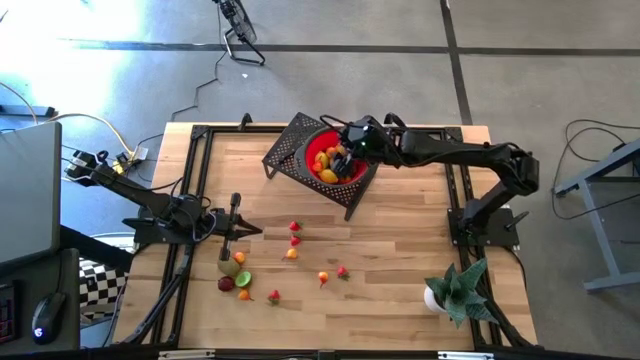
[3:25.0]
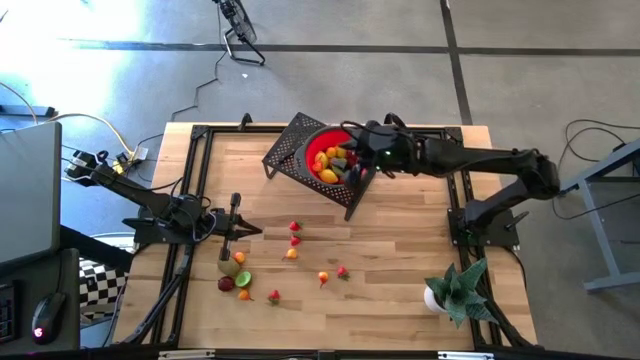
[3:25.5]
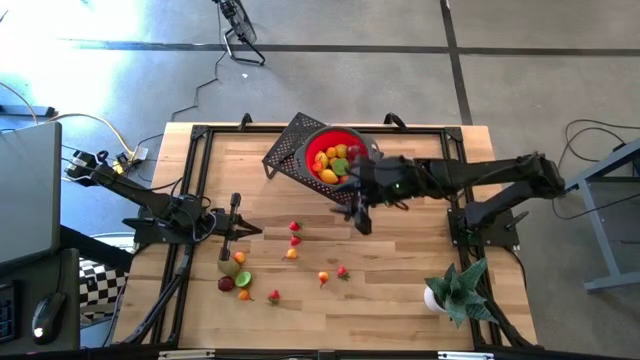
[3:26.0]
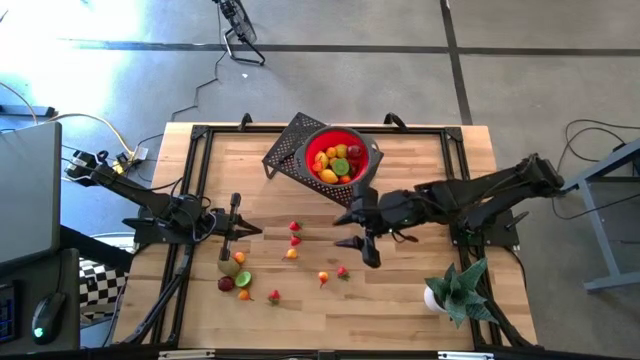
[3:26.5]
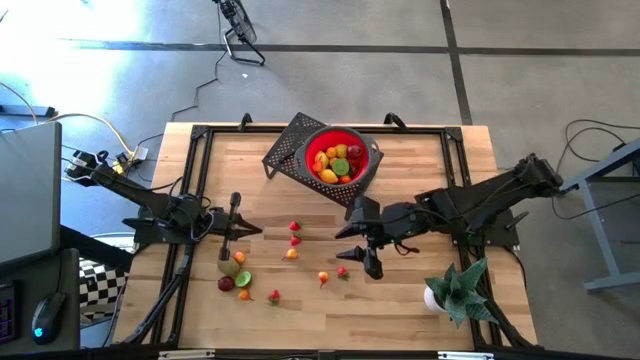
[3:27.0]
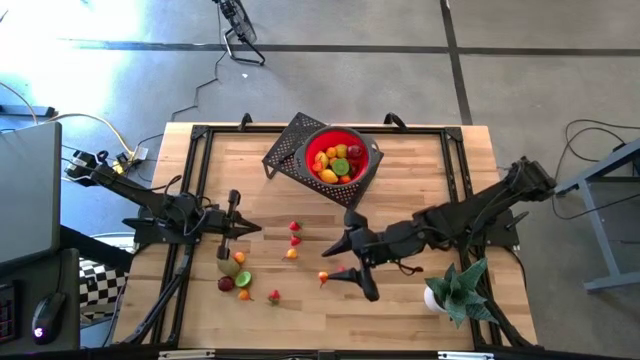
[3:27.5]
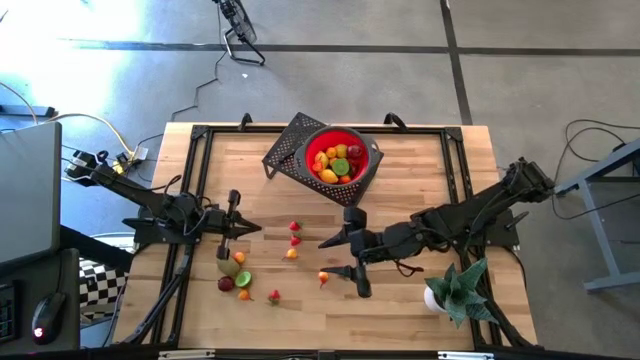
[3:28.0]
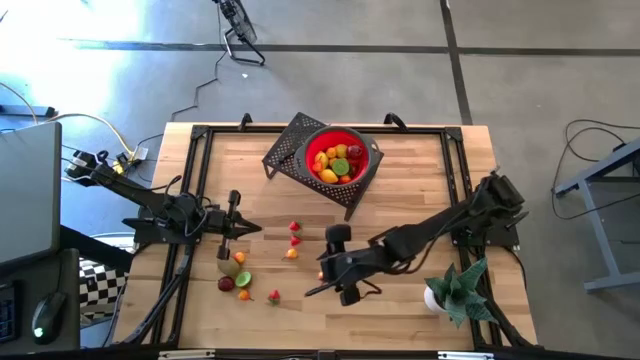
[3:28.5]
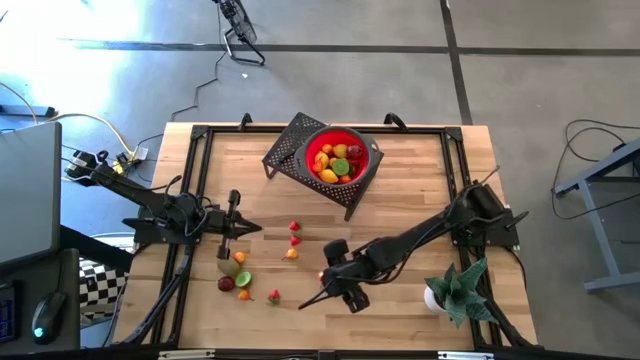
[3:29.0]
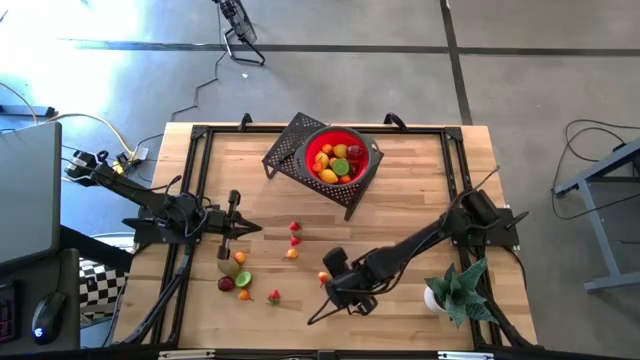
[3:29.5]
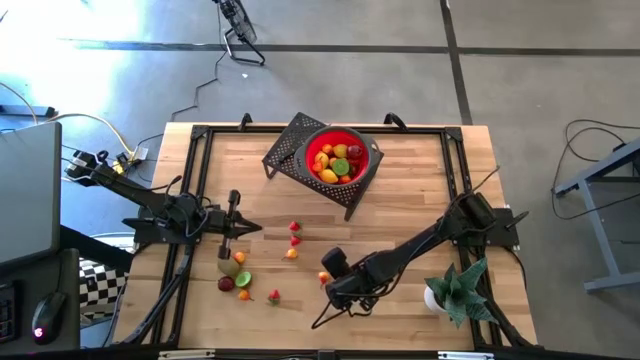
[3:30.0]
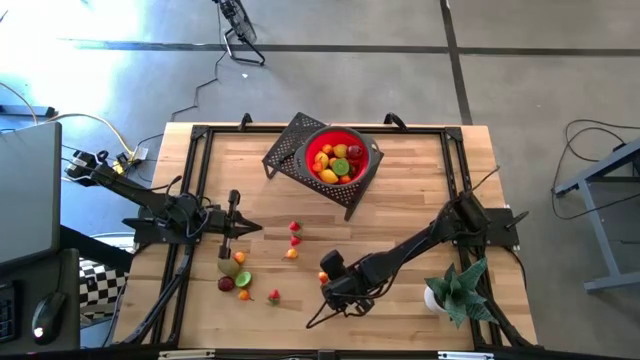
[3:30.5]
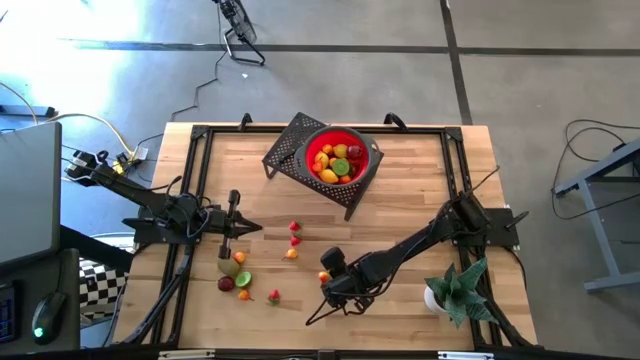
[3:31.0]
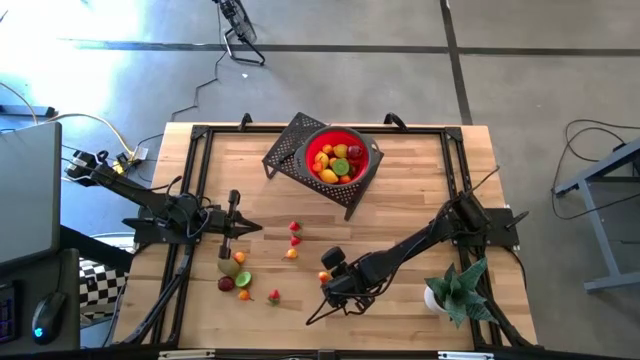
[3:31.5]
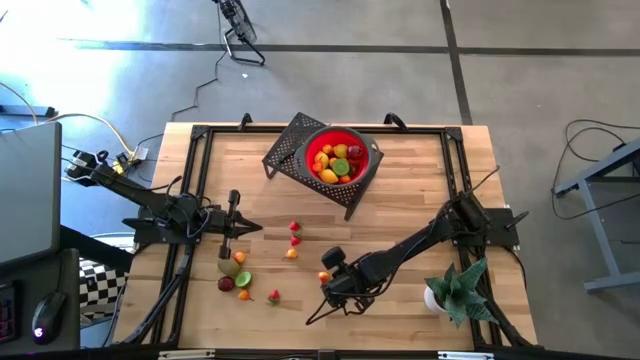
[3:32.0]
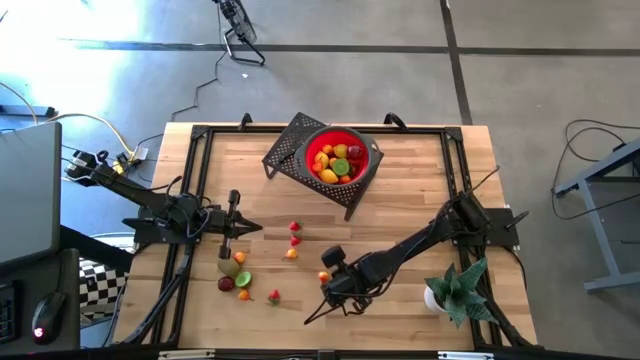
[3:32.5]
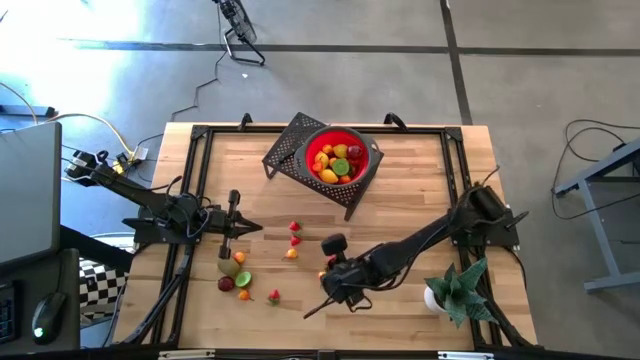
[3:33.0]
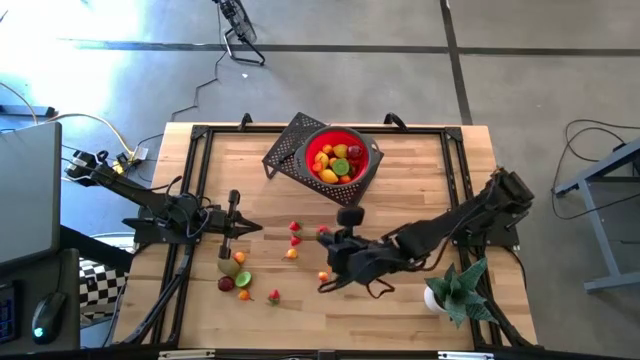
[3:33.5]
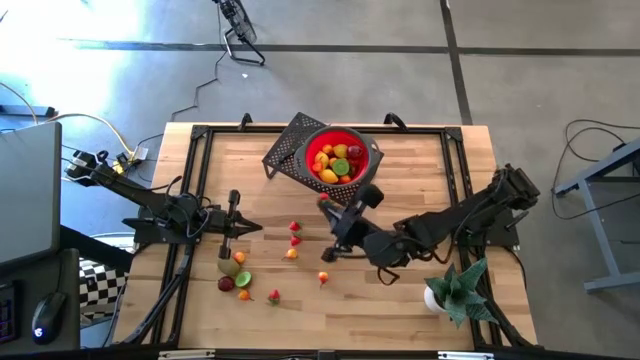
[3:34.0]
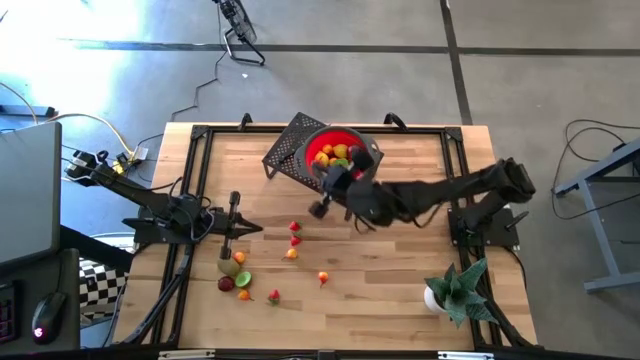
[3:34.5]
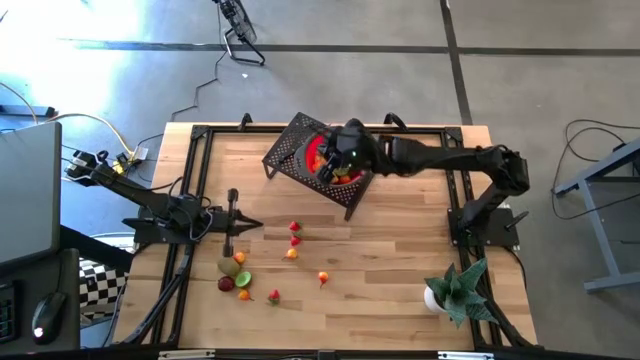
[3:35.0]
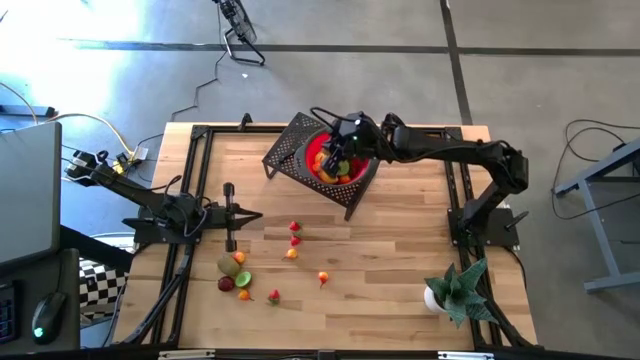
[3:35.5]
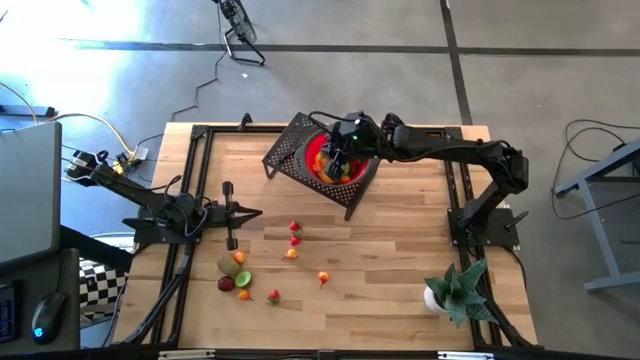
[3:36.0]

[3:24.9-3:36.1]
Task: Pick & Place Fruit
Put the strawberry into the strainer bowl on the shelf

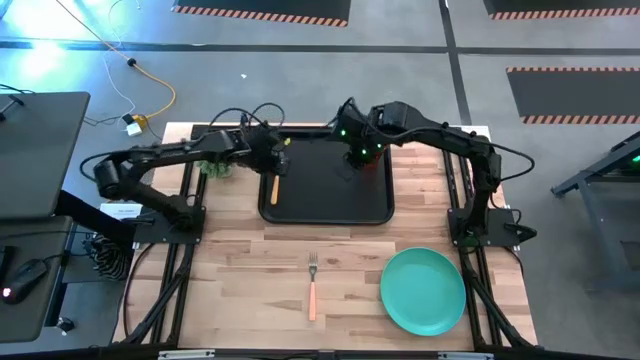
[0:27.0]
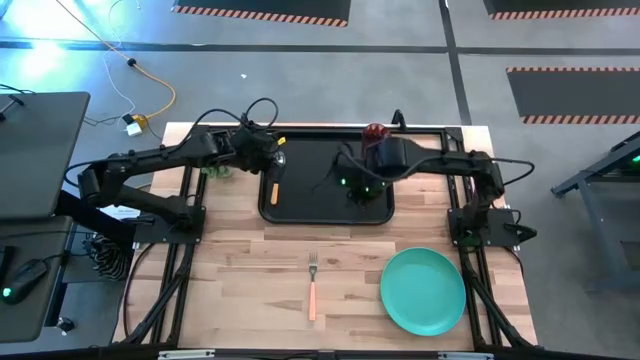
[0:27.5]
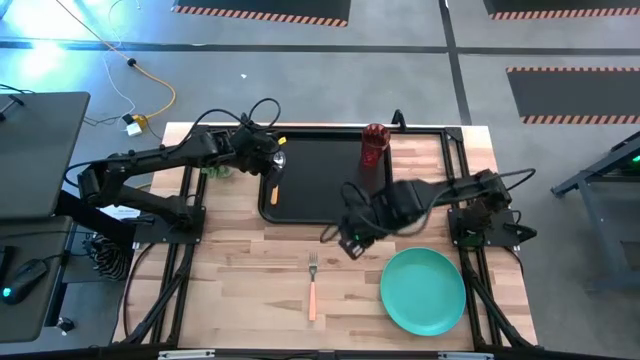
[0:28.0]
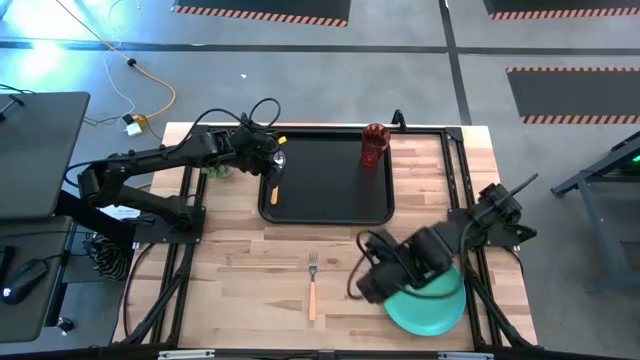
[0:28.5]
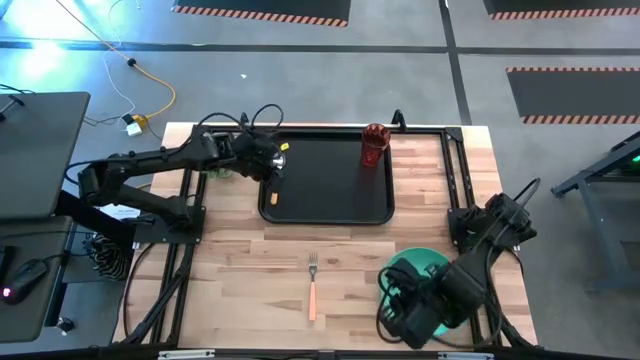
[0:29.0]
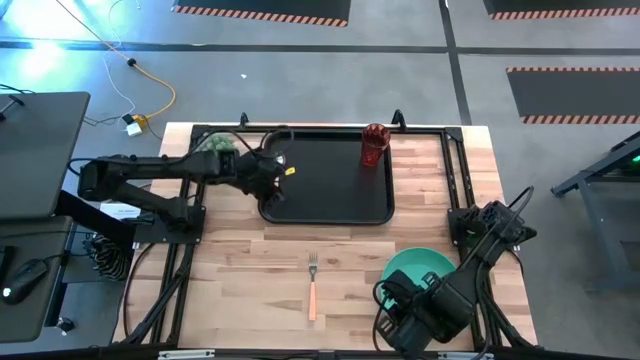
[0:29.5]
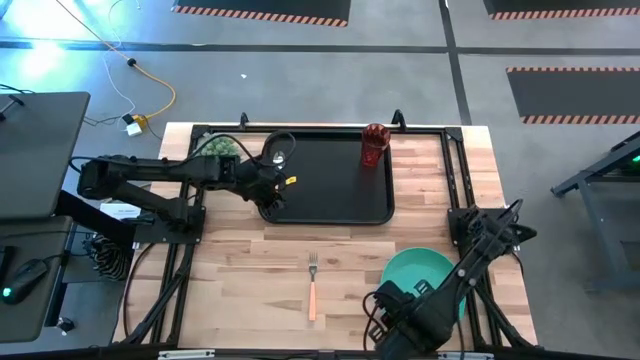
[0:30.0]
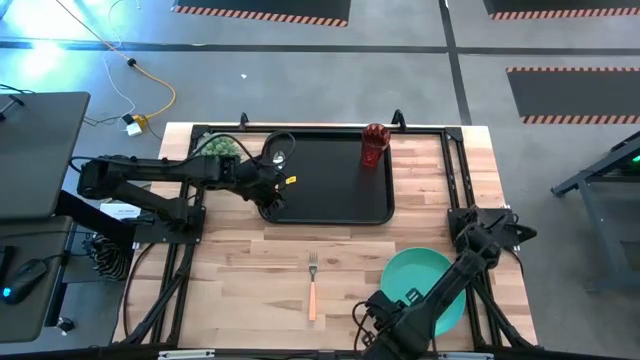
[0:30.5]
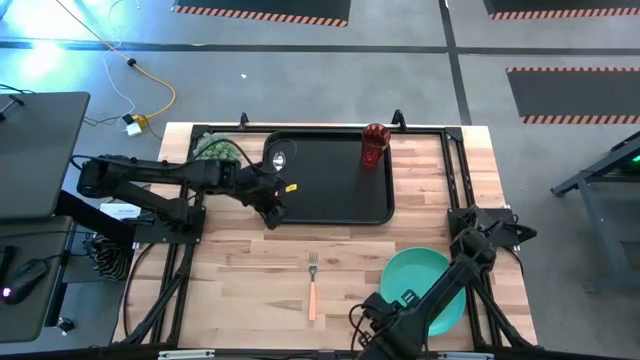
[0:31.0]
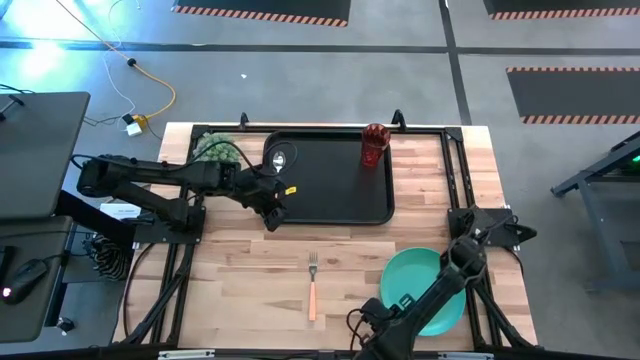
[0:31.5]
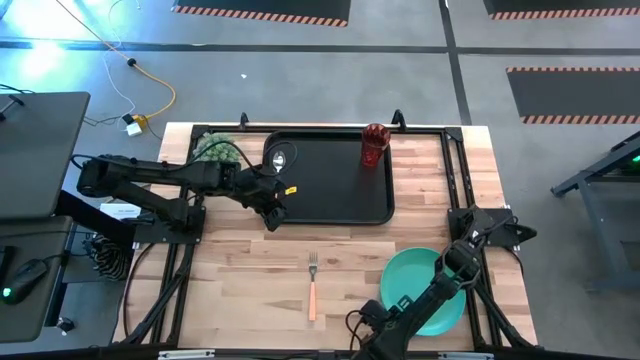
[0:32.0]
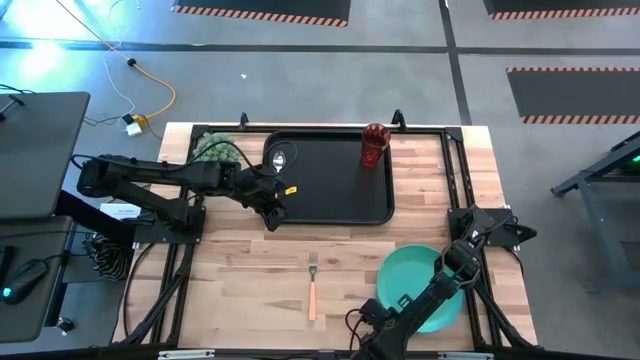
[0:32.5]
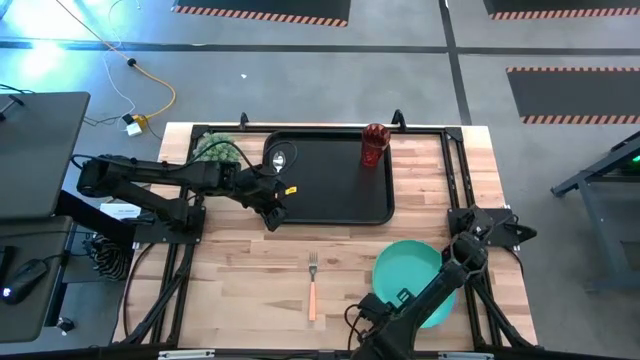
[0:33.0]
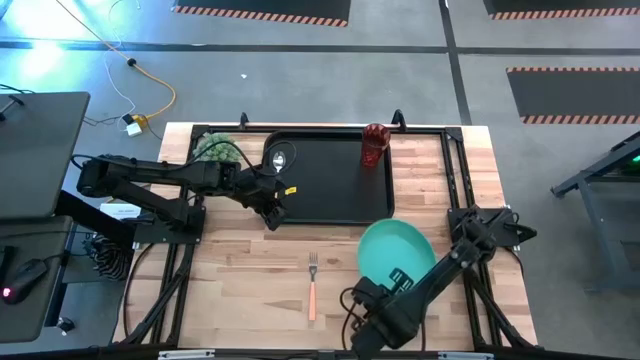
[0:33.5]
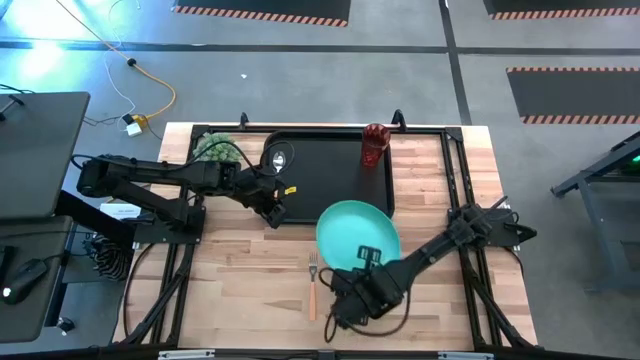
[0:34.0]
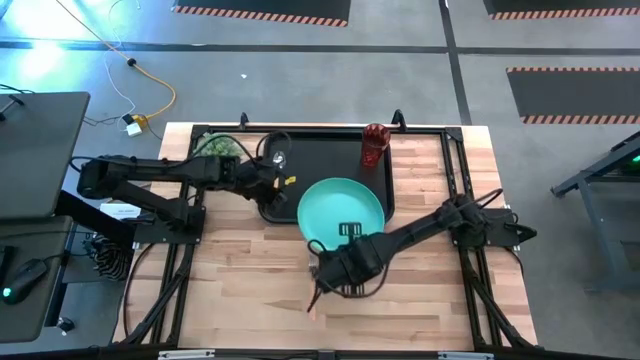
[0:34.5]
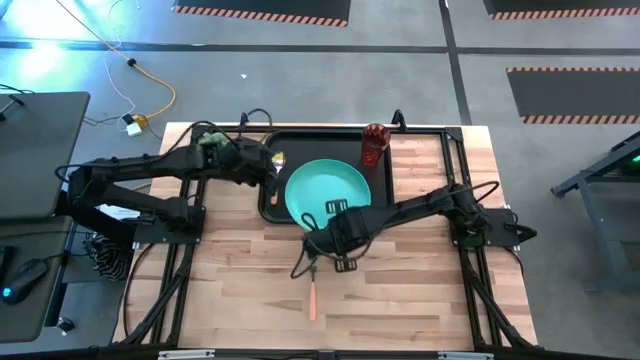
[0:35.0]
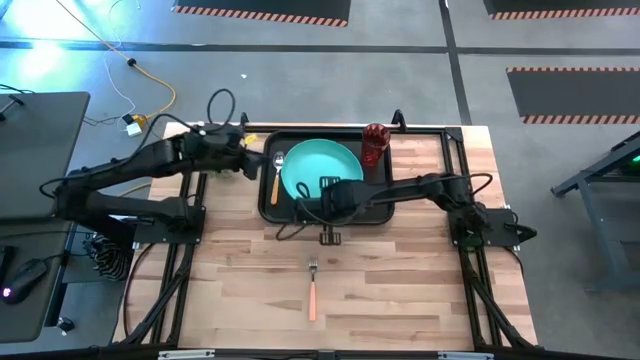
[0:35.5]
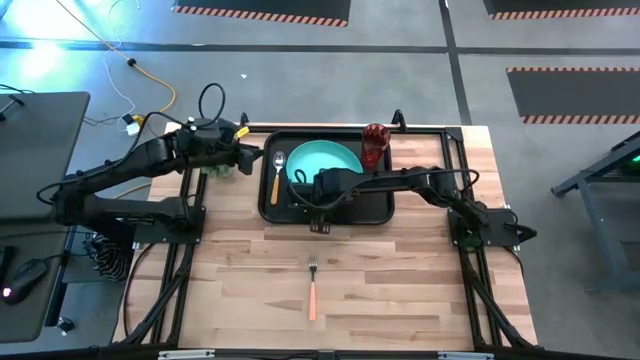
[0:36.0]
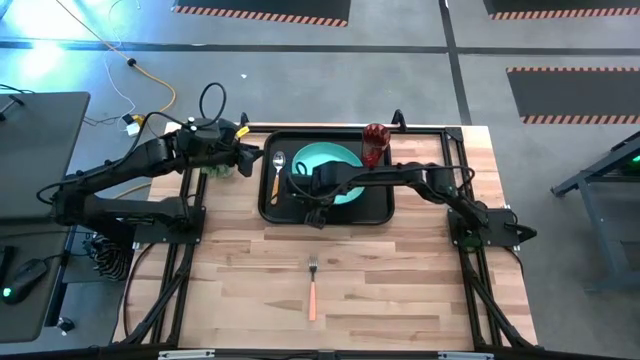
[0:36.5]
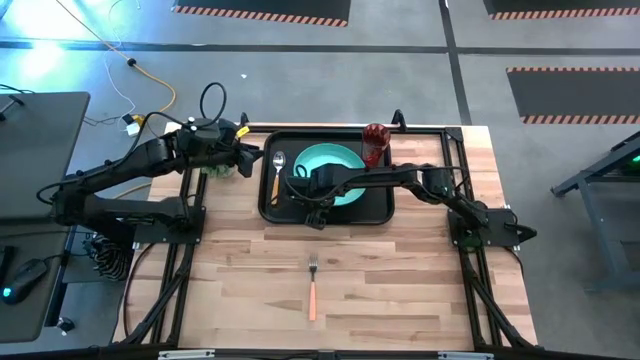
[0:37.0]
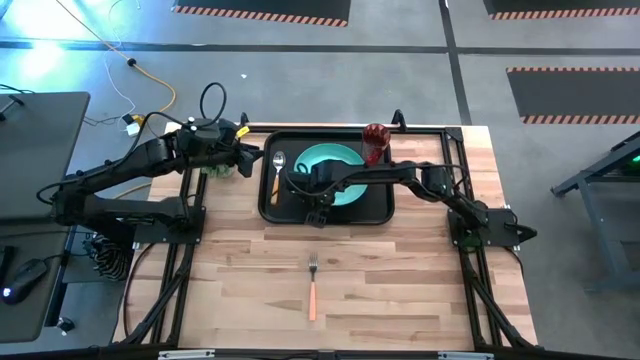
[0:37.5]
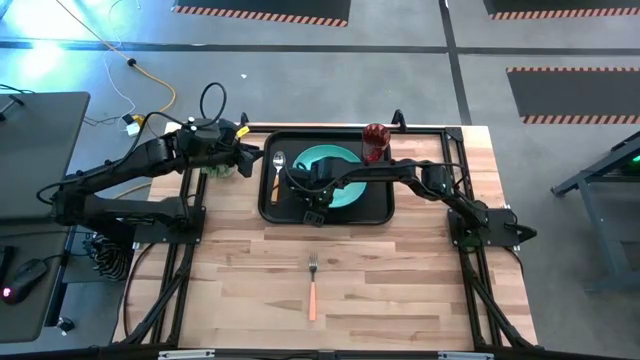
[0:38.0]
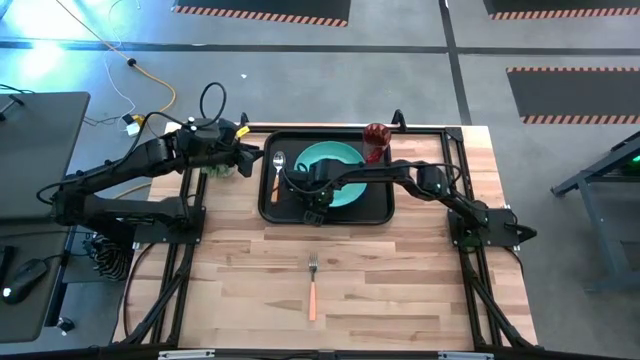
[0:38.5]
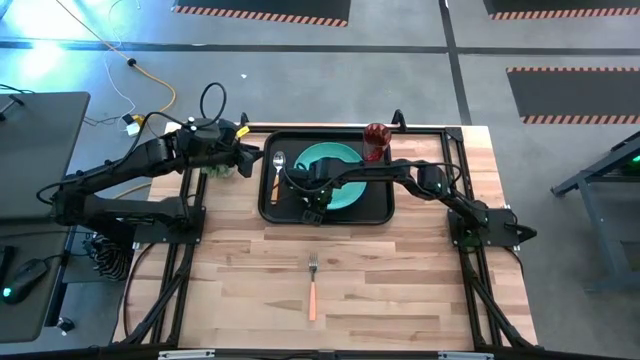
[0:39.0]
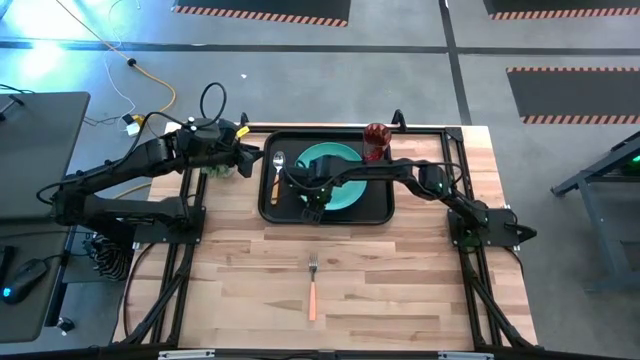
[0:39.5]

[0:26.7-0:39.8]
Task: Pick and place plate/cup/fork/spoon on tray
Put the light blue plate on the black table tray
